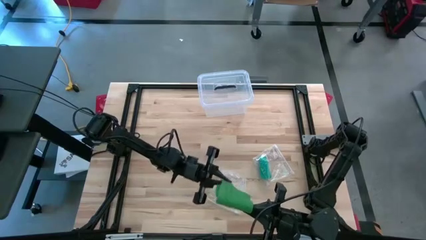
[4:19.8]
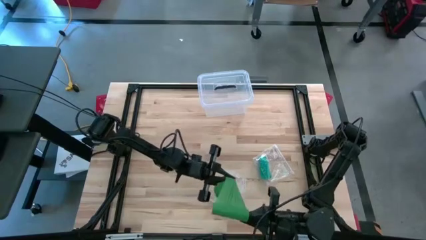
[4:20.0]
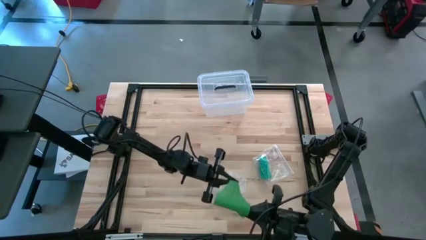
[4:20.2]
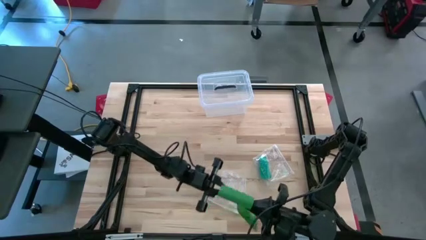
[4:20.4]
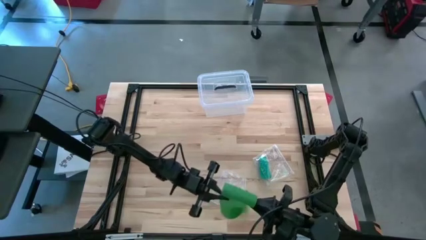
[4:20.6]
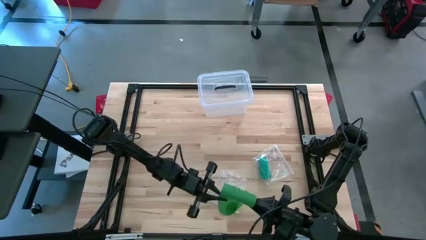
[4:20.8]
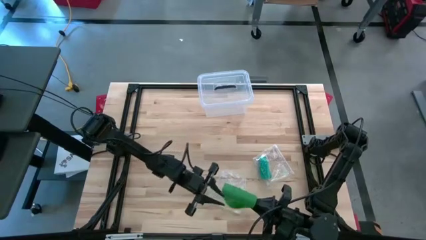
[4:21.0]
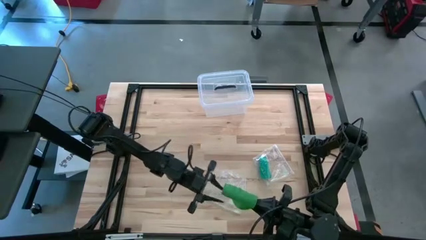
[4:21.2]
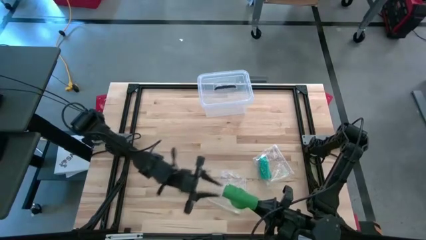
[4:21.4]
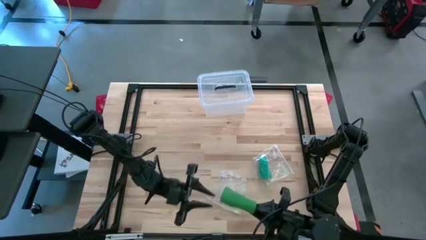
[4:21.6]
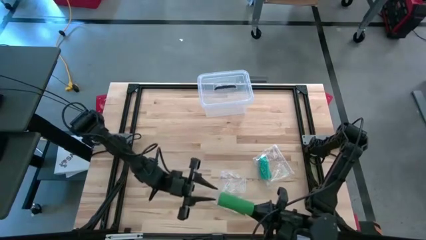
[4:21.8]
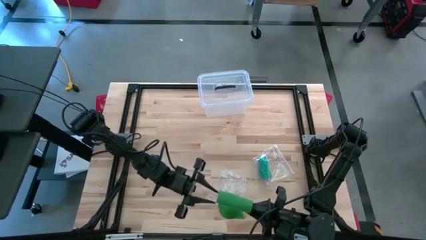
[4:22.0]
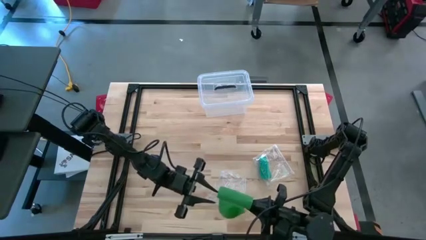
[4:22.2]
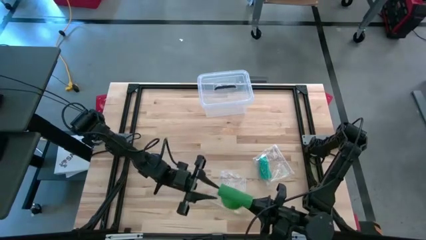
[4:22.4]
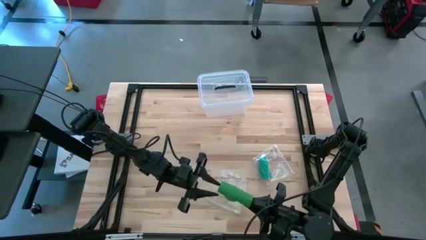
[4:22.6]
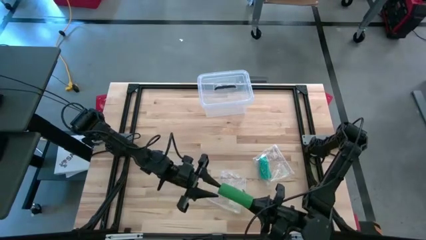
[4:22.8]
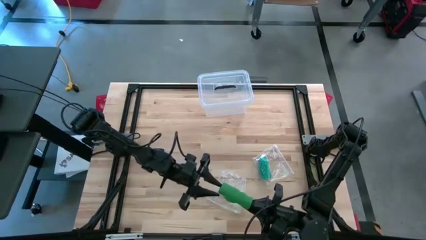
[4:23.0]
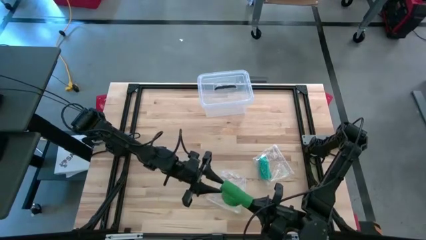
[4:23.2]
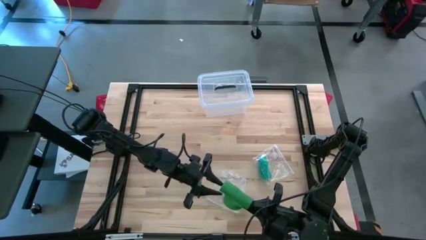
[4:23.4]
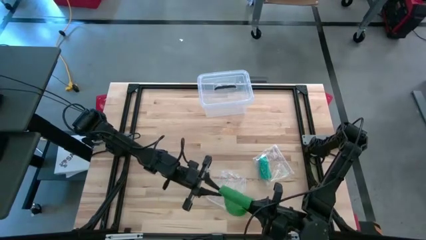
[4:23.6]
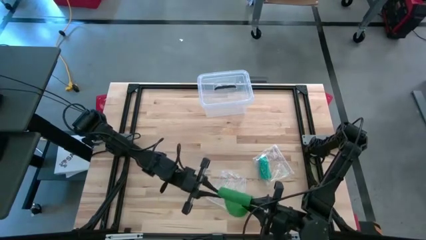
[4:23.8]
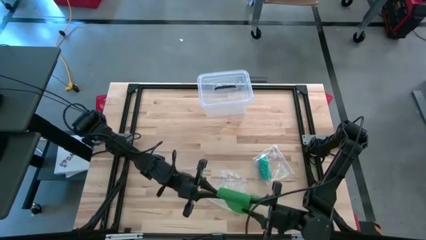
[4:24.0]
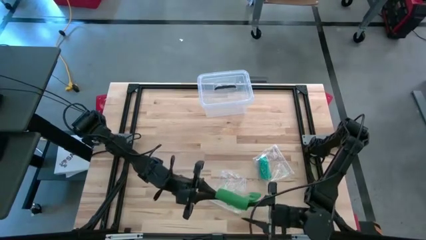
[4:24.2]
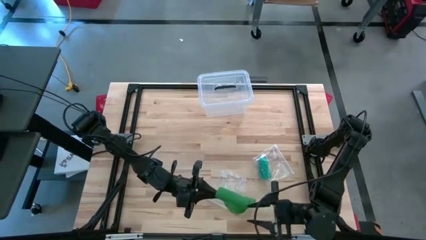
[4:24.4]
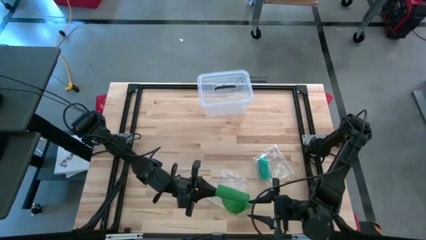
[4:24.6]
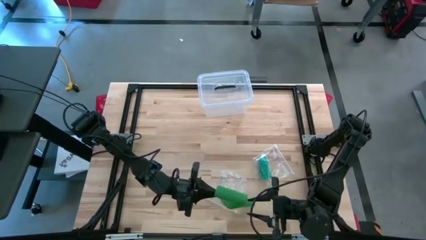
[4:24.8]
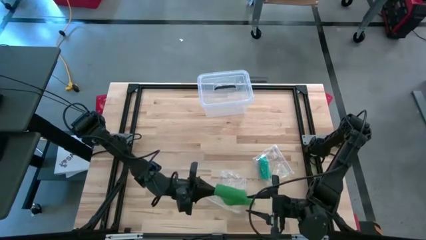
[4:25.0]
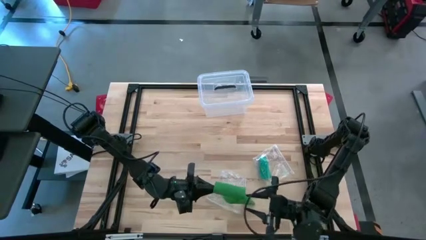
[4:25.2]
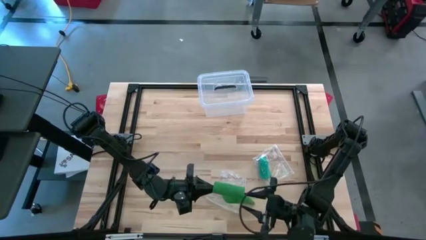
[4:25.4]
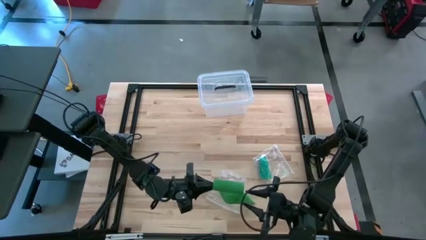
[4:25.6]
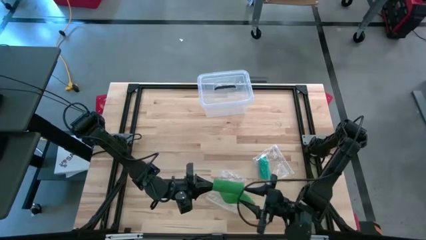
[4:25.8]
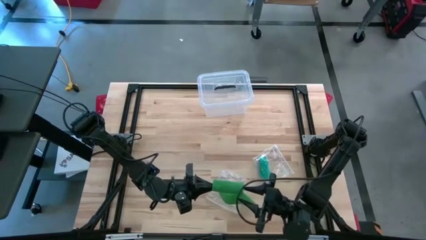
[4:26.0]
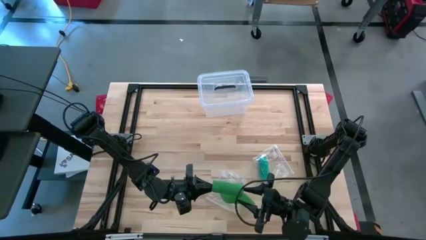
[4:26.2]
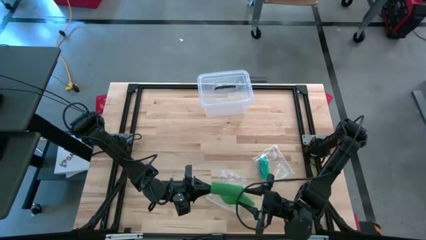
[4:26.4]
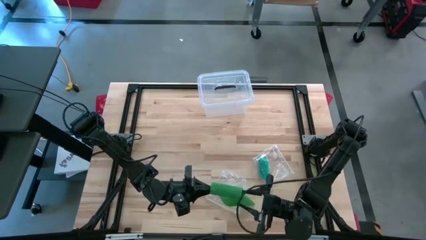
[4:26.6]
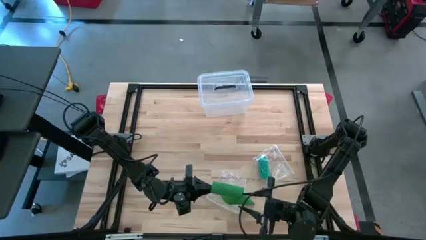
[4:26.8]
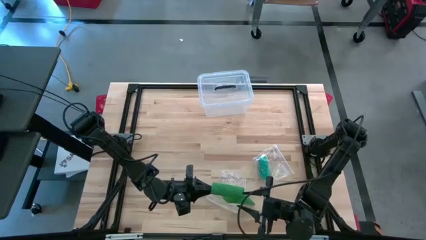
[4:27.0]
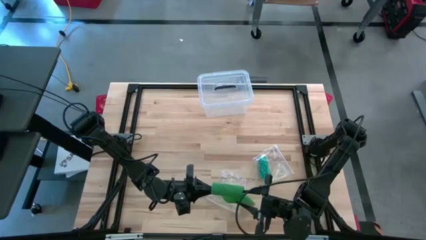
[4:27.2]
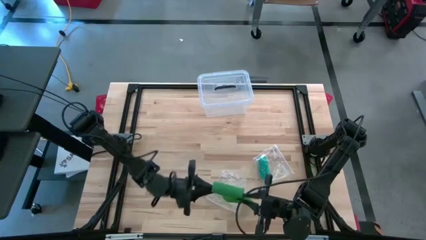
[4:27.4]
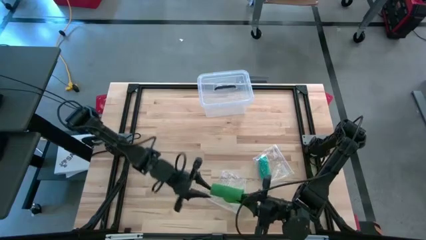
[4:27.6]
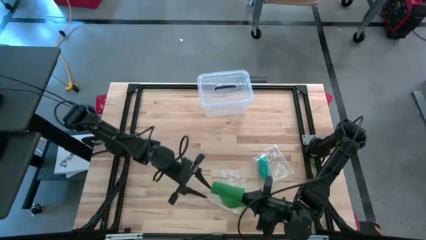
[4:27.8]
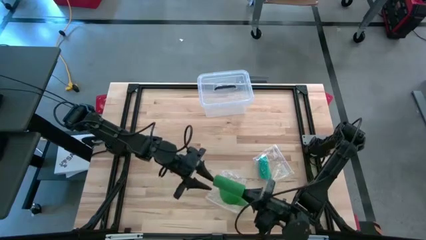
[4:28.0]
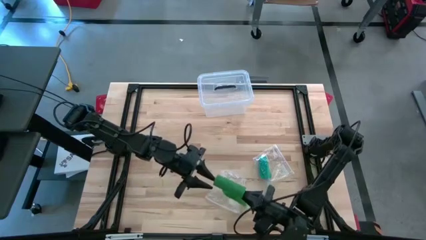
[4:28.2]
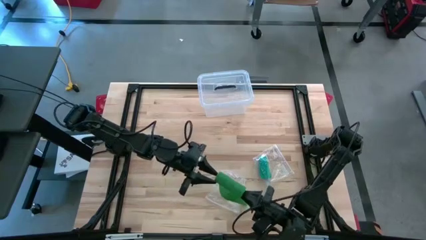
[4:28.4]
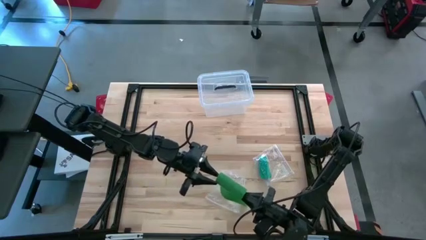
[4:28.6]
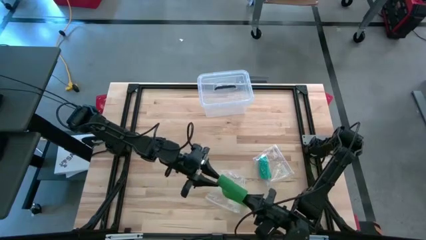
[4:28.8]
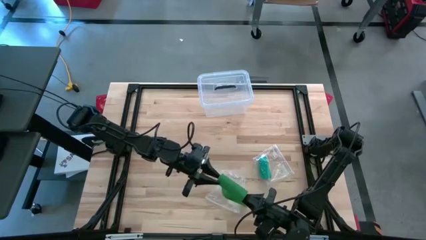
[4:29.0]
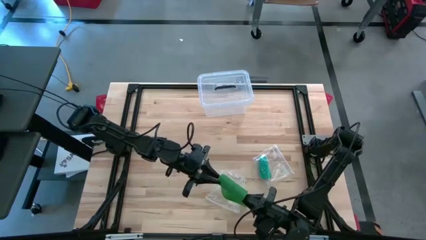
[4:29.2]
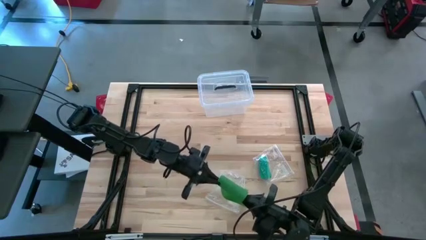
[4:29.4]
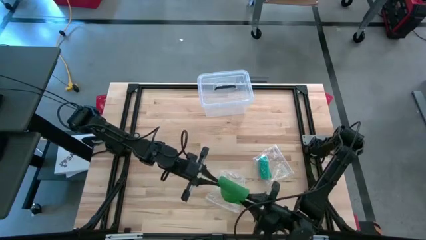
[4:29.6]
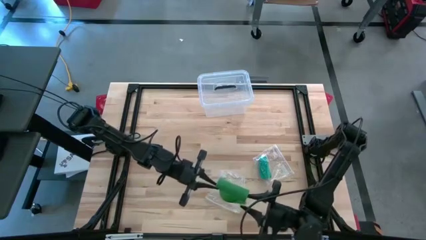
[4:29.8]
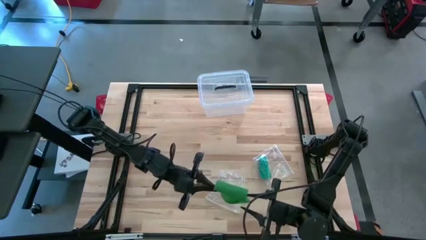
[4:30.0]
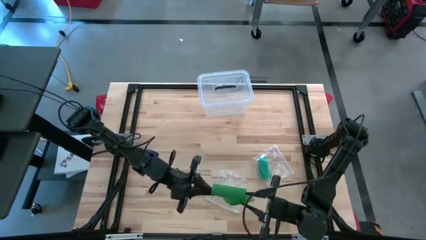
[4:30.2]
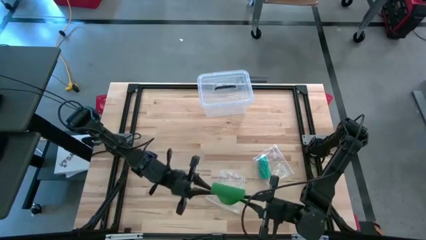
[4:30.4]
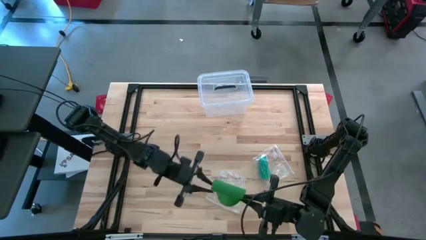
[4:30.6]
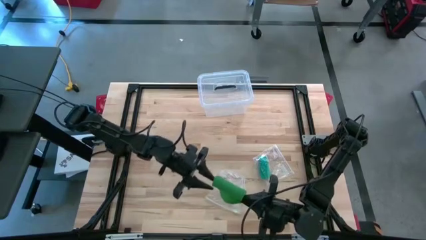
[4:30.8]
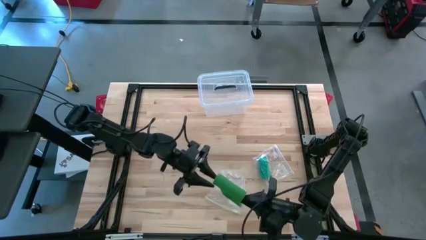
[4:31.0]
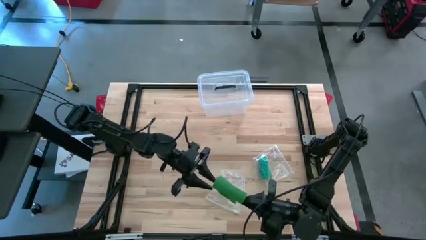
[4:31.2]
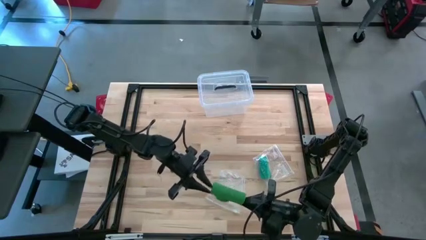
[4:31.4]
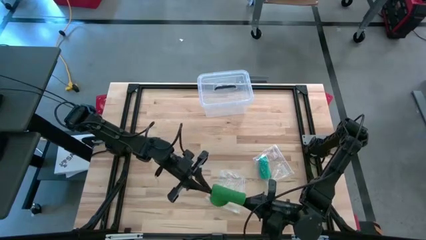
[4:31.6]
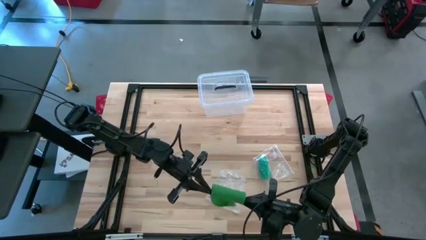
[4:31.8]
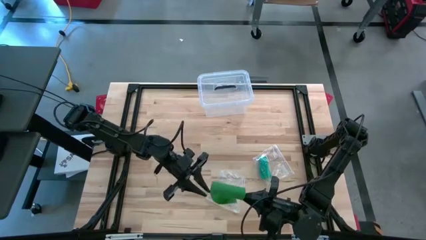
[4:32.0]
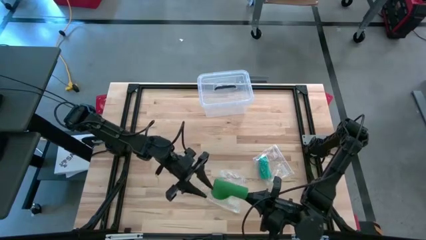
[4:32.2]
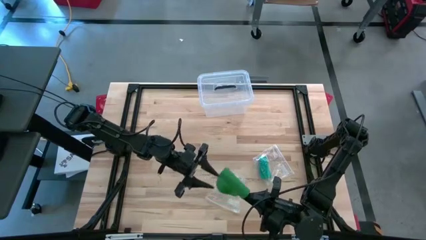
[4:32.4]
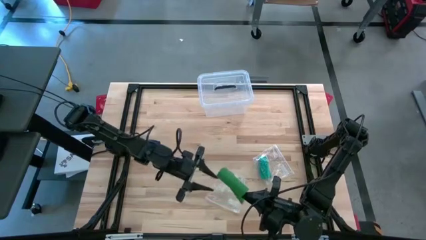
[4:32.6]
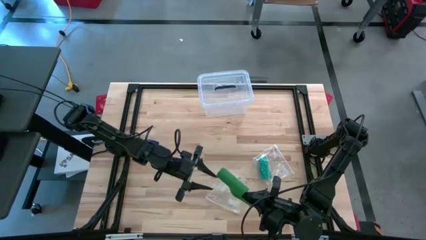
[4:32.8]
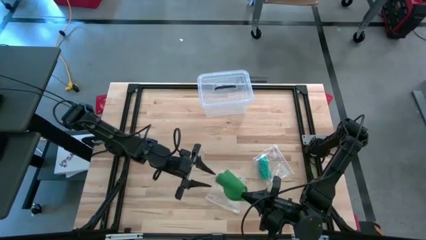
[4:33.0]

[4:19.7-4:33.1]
Task: Roll bandage
Roll the green bandage

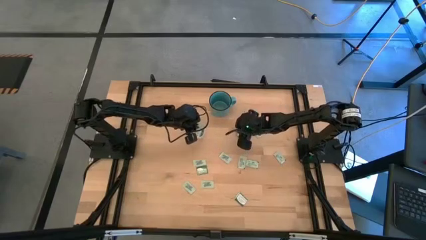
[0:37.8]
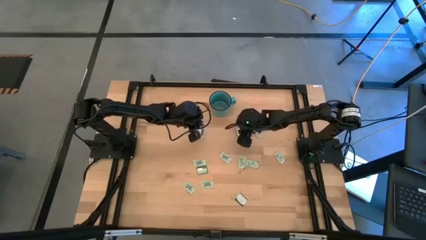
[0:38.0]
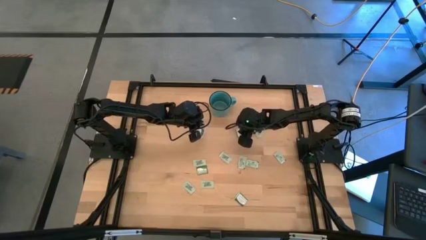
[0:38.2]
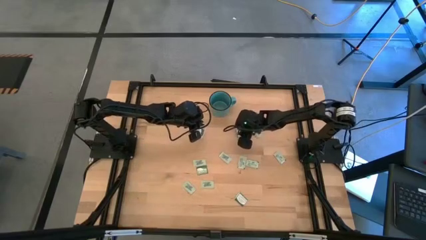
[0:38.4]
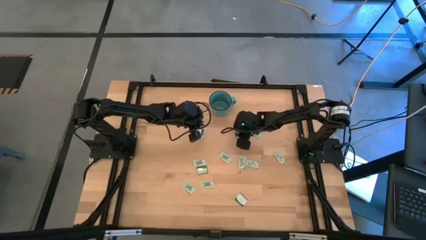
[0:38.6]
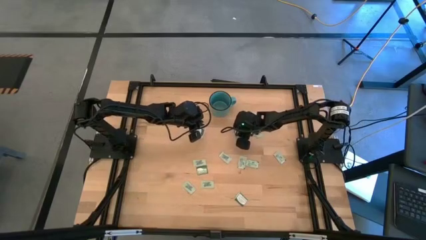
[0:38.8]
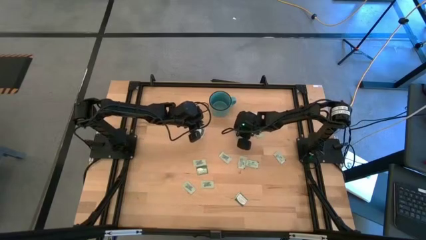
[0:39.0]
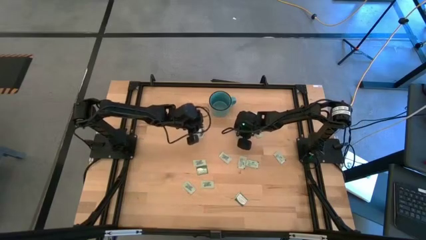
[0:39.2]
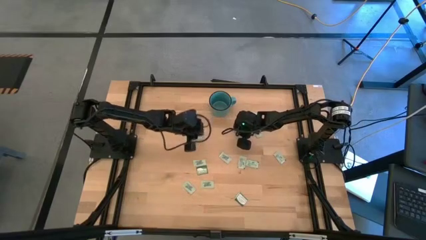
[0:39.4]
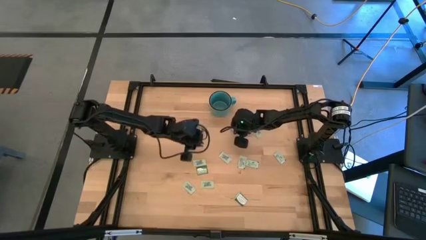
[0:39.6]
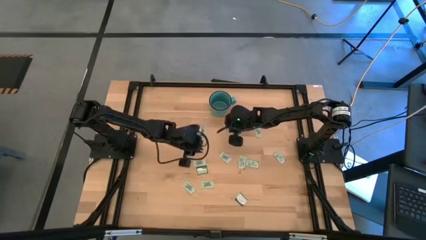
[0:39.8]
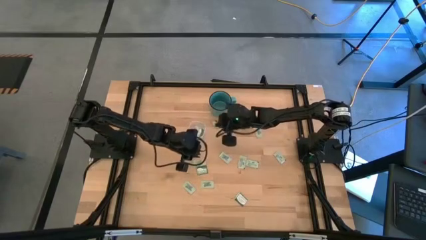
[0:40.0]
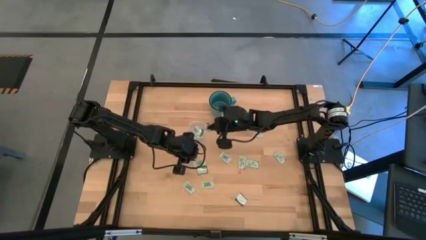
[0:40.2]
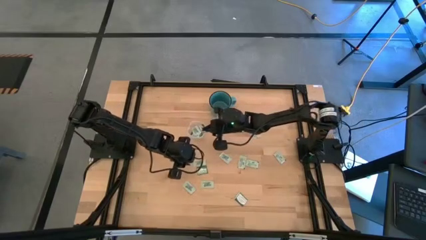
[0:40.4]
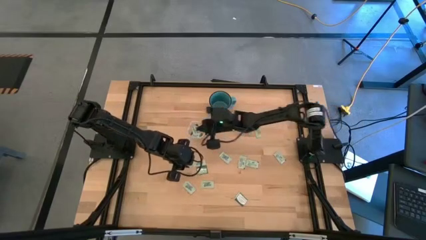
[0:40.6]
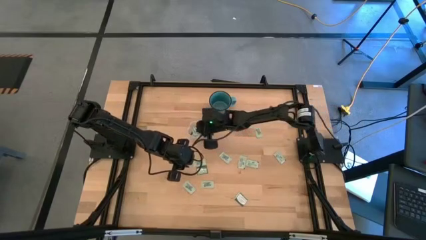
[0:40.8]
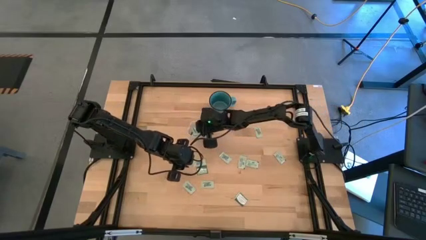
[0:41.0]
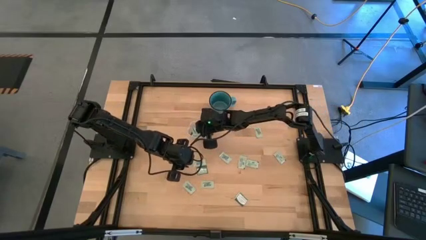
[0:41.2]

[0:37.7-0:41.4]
Task: Pick and place Stevia / Truvia into bins
Put the dark green truvia packet into the transparent container
